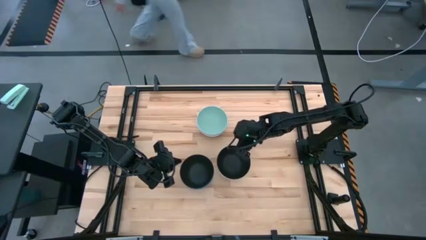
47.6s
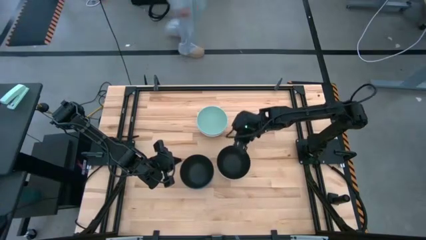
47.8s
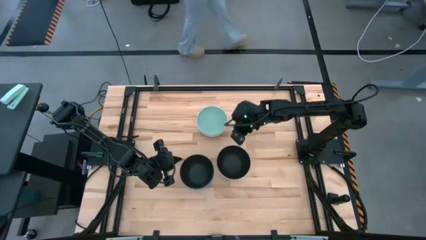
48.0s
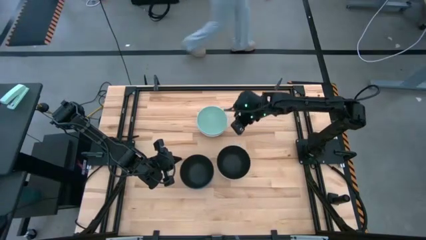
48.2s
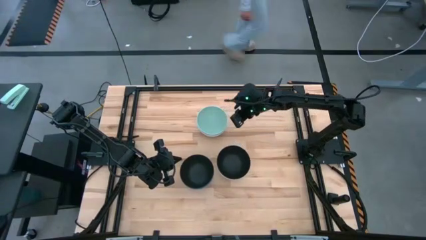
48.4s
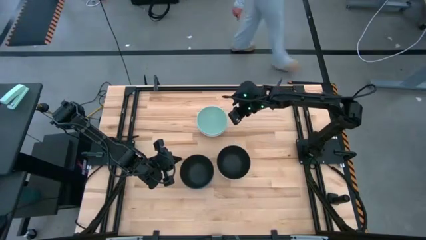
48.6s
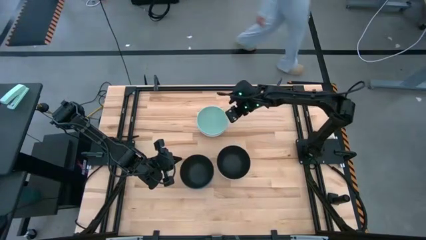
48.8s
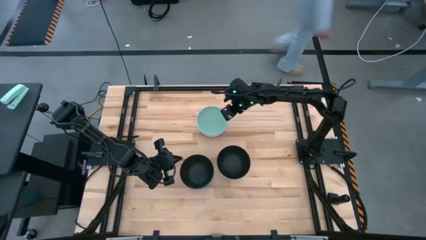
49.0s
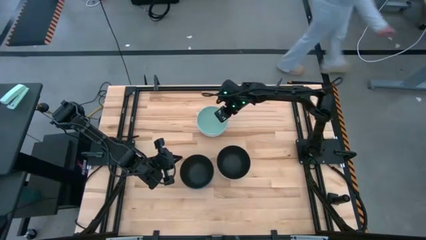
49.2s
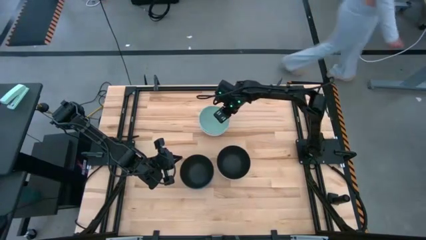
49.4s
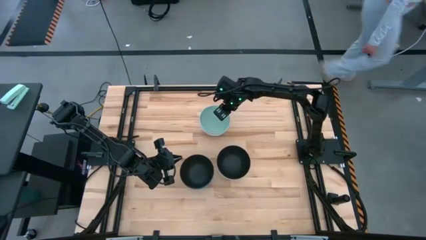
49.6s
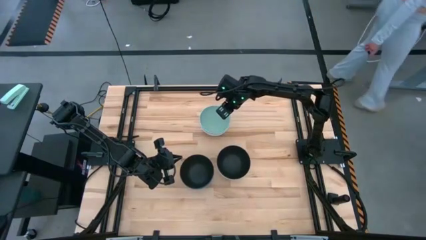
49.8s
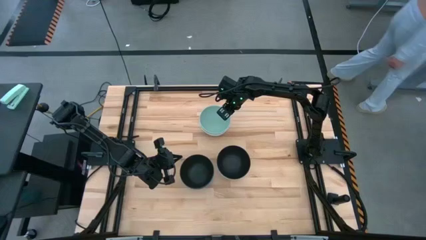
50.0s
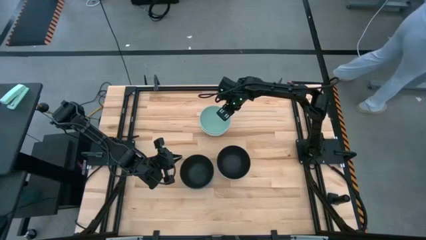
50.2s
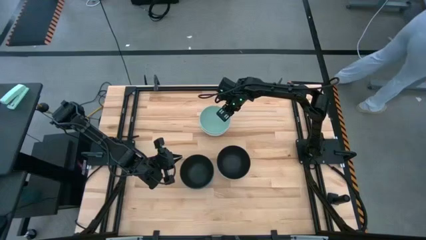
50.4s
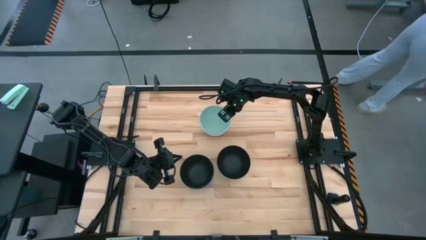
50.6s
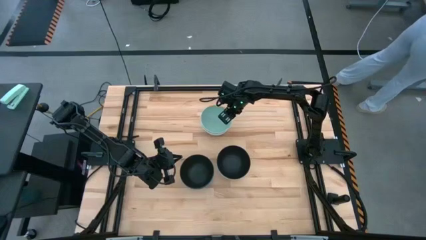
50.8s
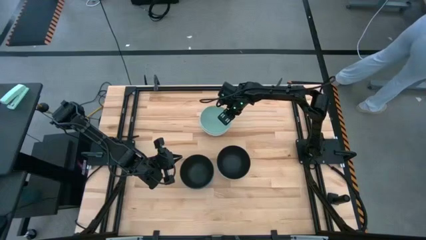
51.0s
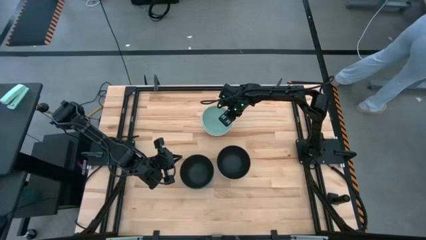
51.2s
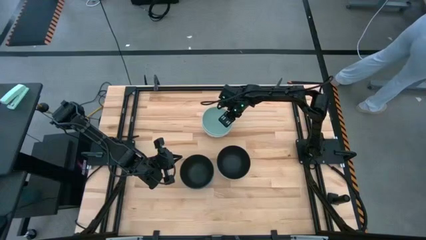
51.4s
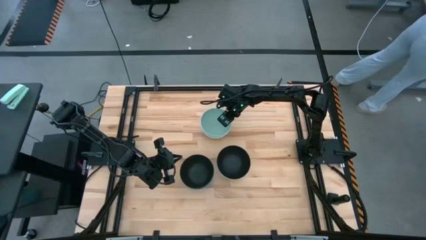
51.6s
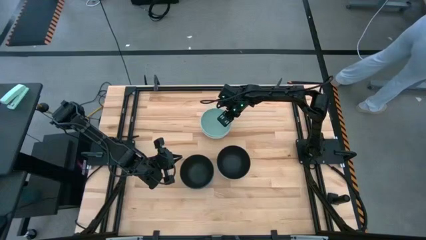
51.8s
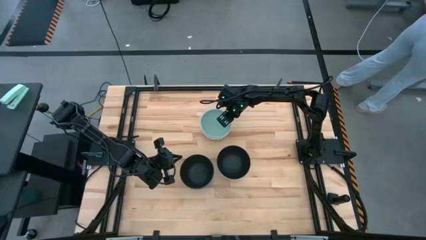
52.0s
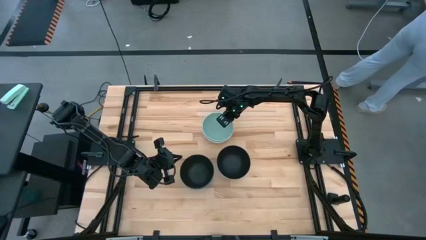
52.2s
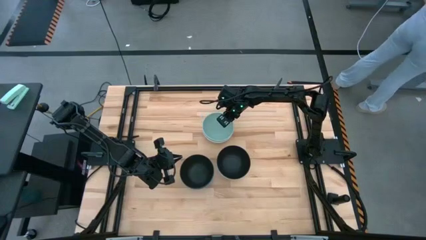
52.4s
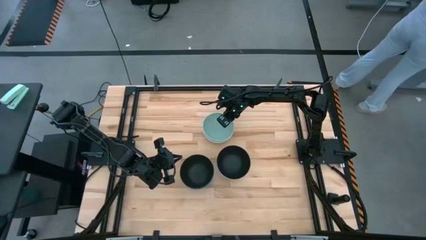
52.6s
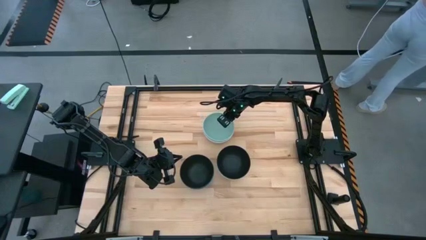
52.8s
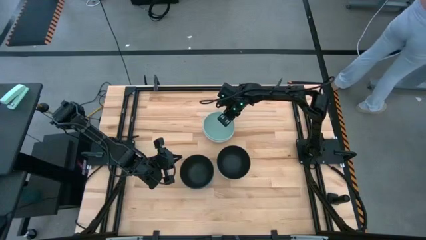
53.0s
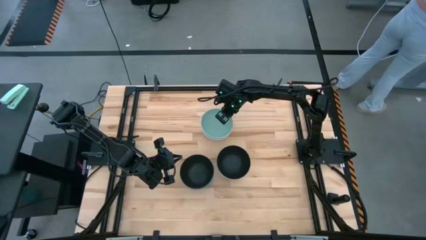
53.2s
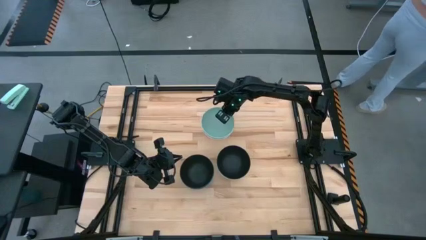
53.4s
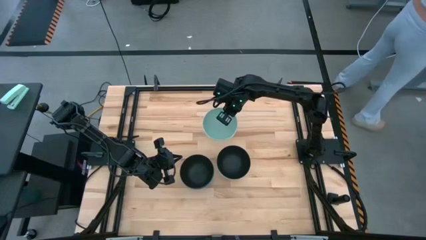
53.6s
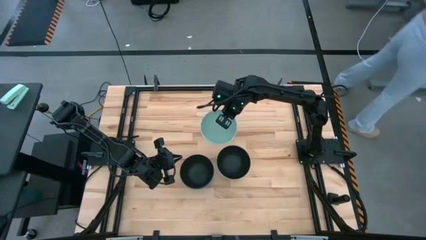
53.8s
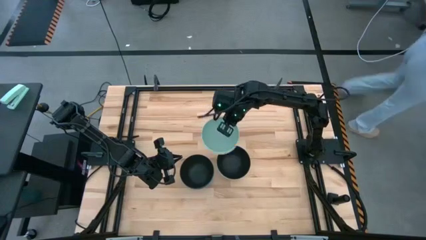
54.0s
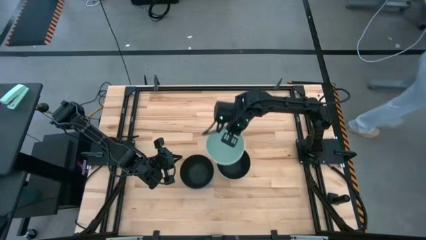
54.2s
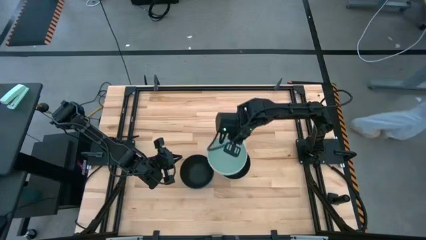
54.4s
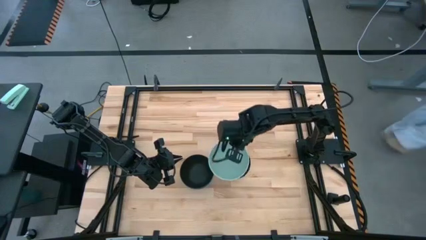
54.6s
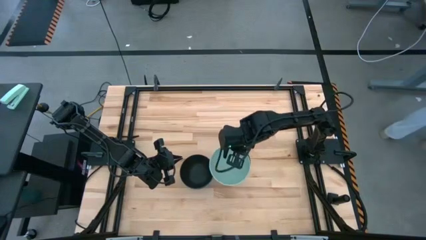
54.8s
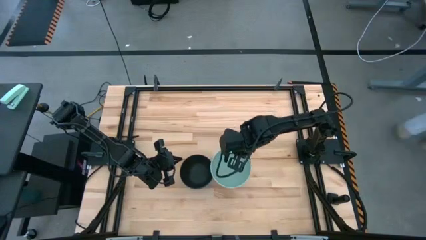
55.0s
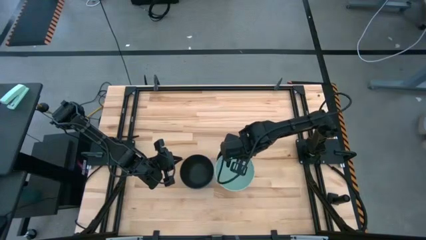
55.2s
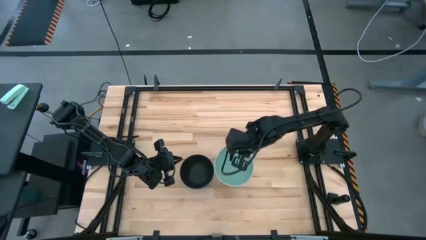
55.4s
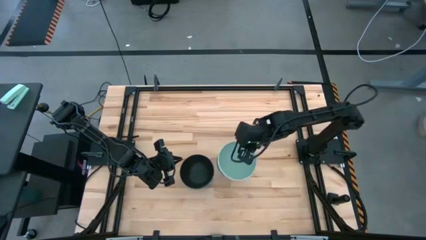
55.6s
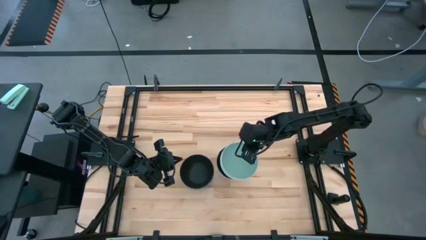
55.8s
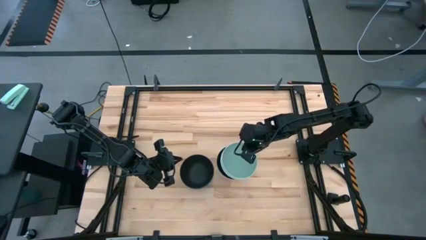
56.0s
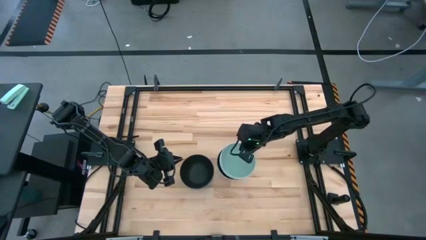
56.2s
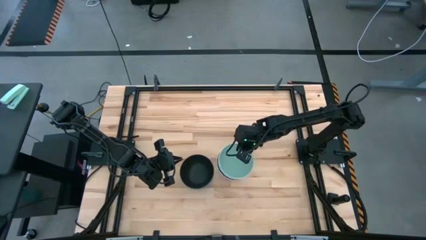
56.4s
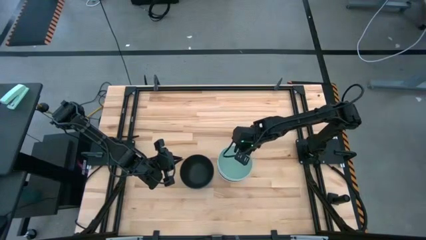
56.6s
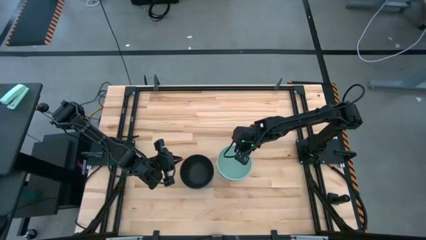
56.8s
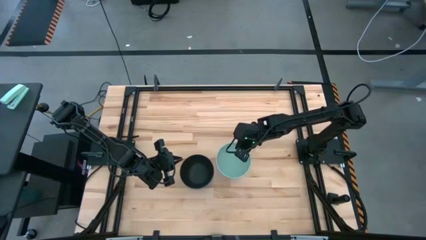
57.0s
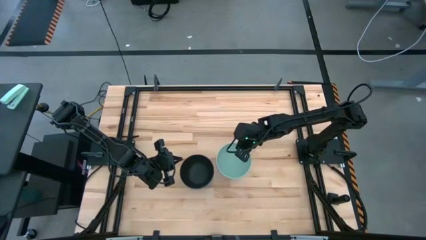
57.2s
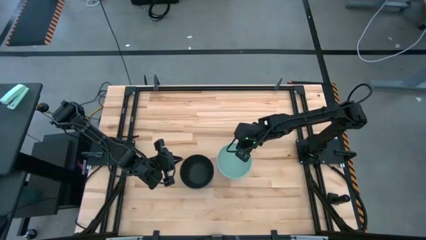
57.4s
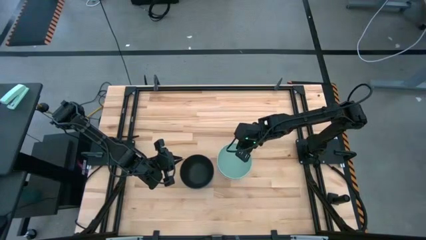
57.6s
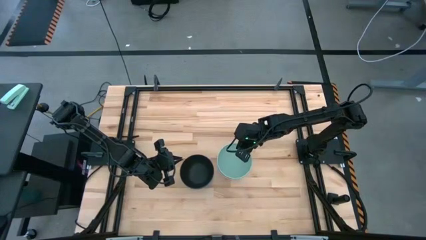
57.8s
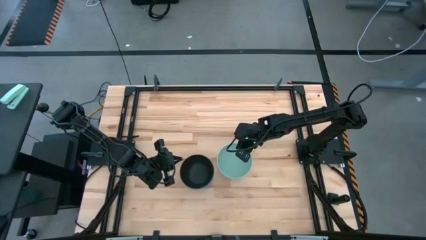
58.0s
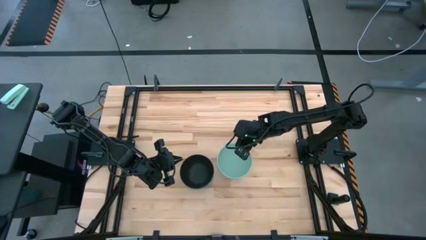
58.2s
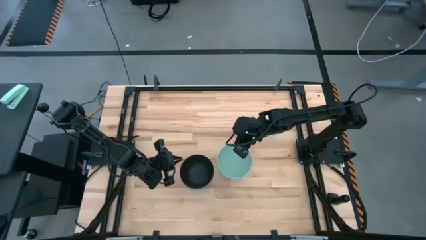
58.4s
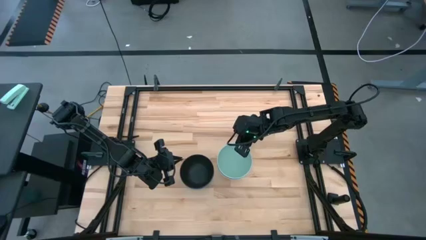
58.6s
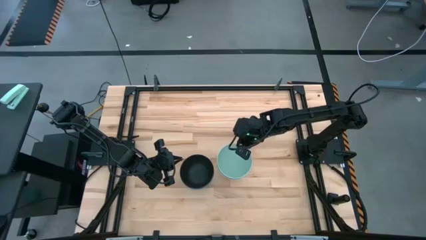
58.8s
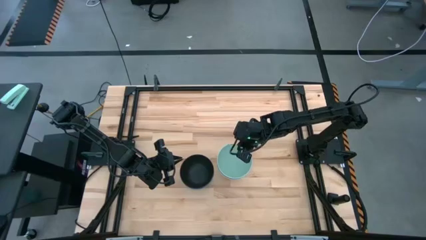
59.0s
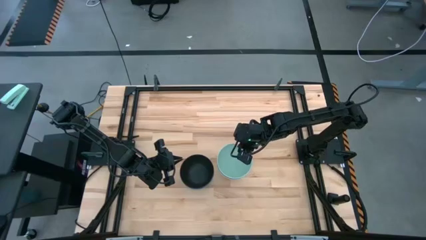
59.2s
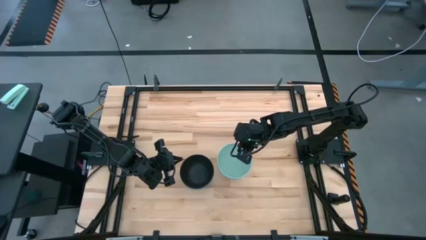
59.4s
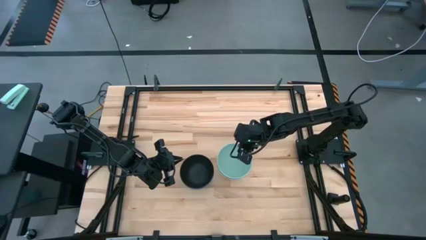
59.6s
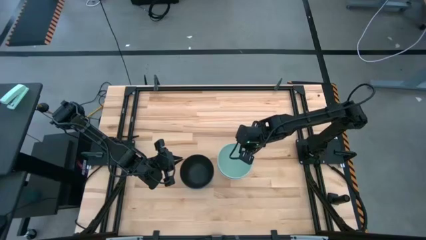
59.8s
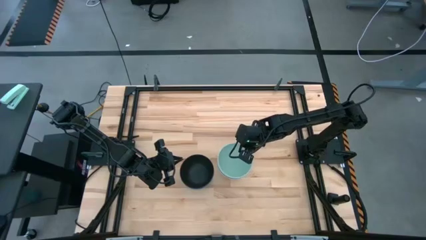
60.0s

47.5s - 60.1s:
Task: Nest bowls inside each other
Stack the stacked bowls on top of the right black bowl
